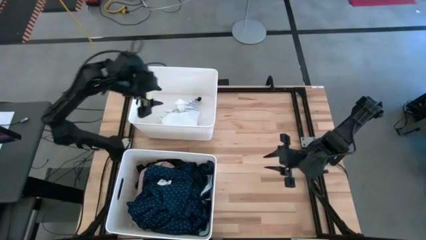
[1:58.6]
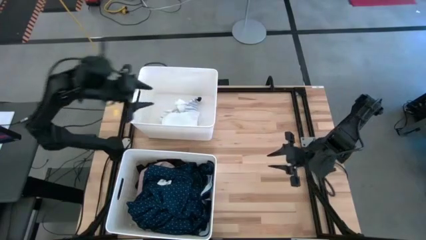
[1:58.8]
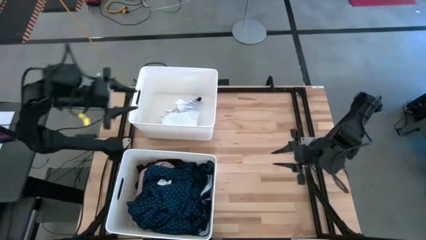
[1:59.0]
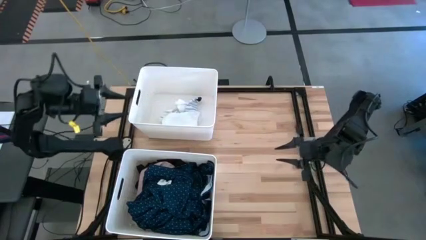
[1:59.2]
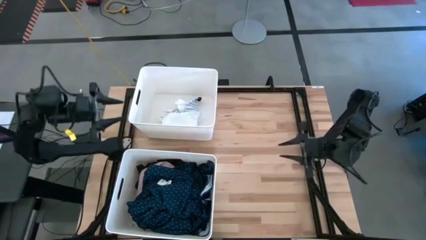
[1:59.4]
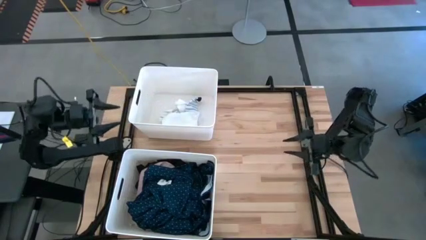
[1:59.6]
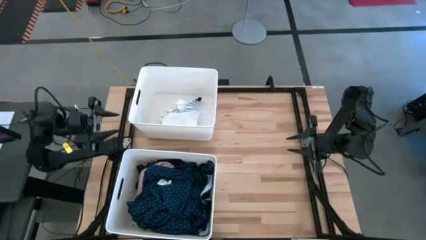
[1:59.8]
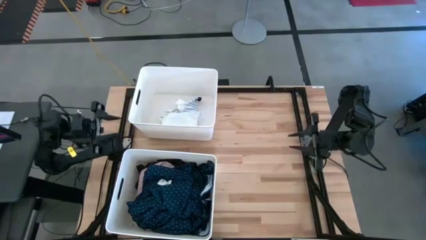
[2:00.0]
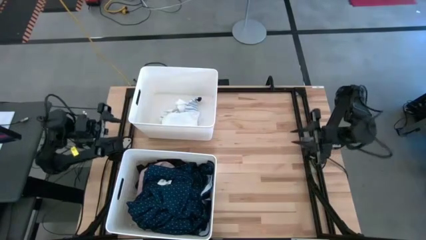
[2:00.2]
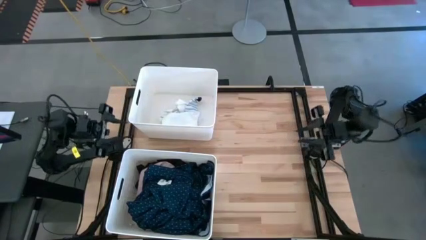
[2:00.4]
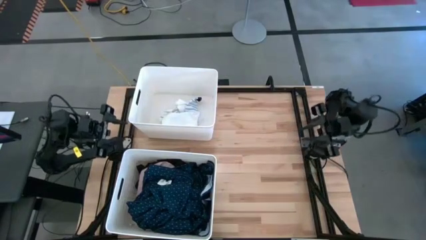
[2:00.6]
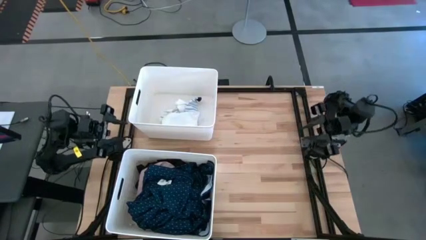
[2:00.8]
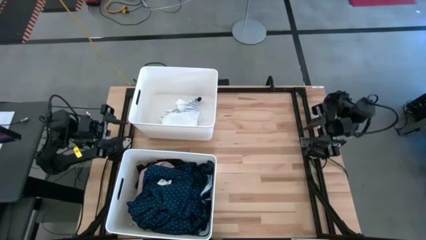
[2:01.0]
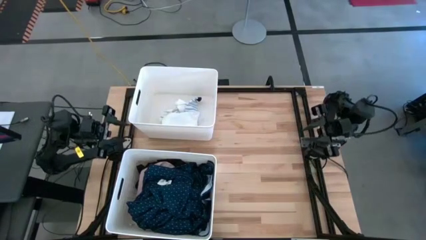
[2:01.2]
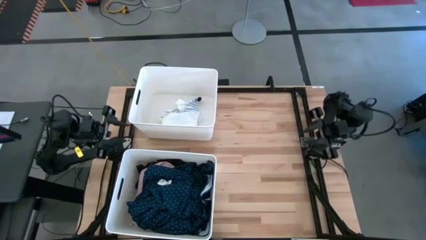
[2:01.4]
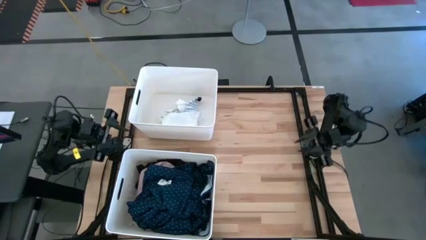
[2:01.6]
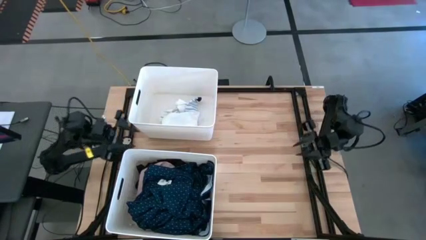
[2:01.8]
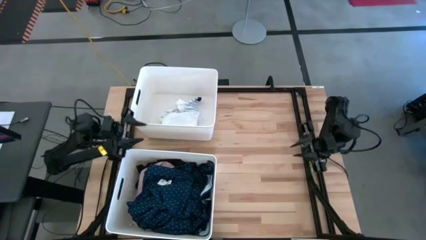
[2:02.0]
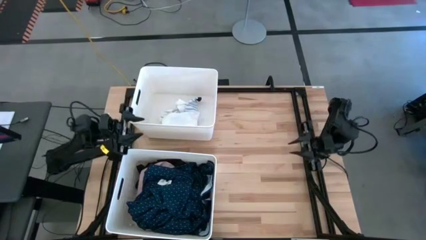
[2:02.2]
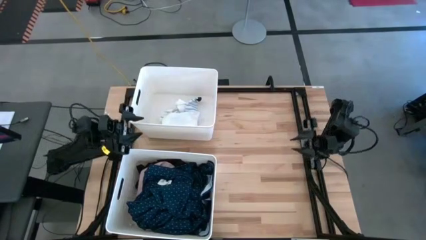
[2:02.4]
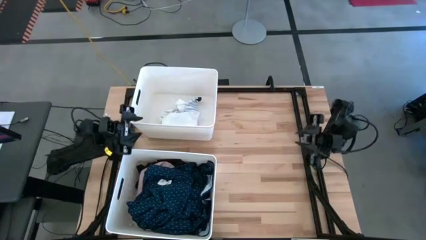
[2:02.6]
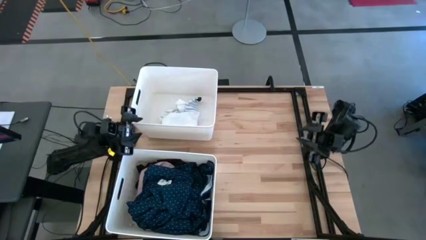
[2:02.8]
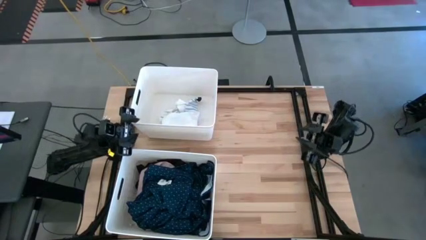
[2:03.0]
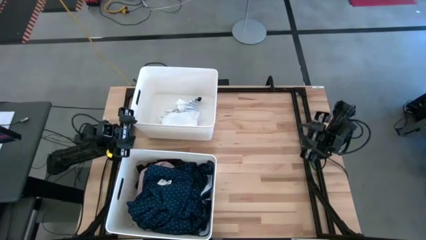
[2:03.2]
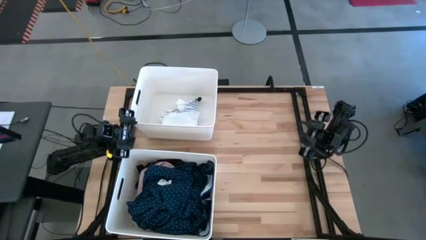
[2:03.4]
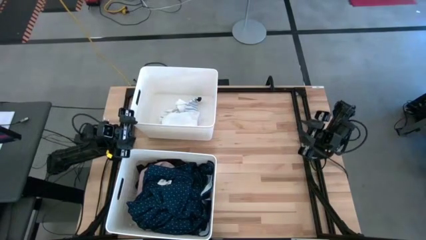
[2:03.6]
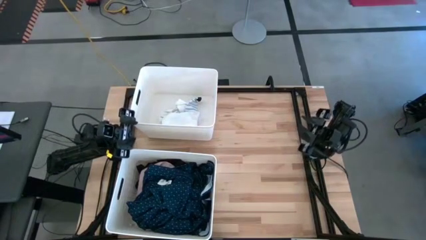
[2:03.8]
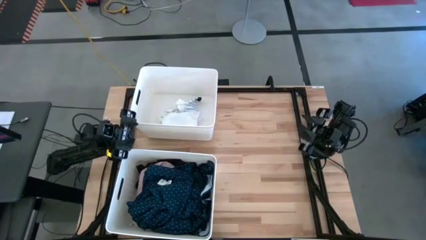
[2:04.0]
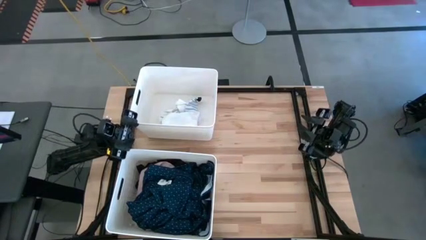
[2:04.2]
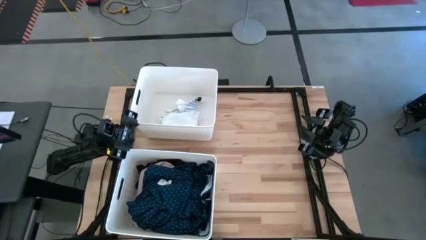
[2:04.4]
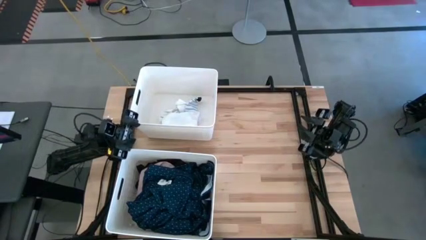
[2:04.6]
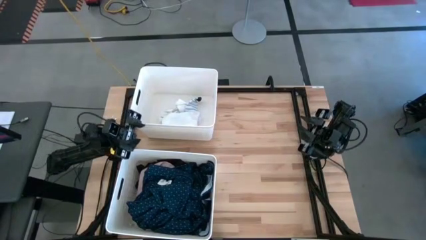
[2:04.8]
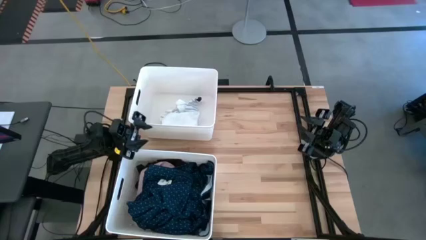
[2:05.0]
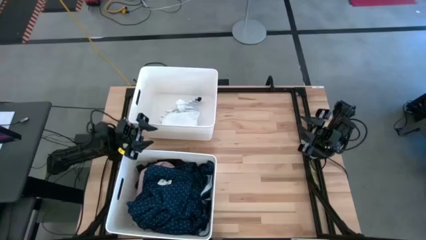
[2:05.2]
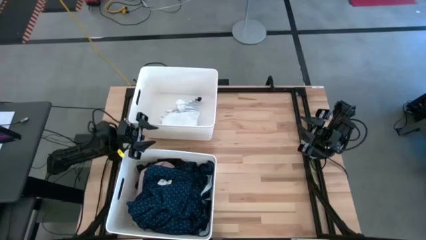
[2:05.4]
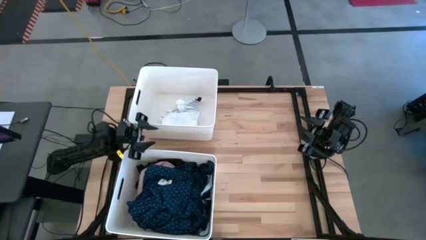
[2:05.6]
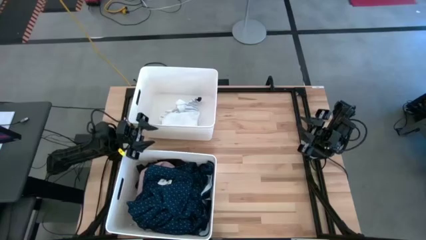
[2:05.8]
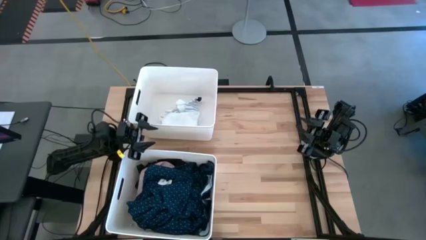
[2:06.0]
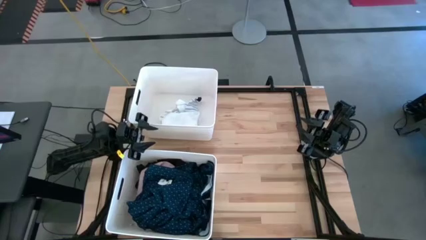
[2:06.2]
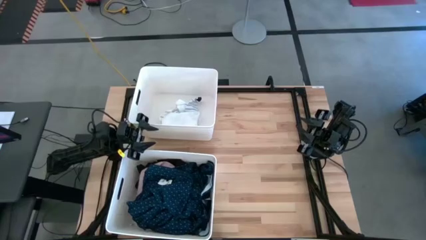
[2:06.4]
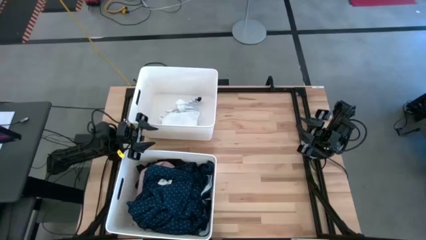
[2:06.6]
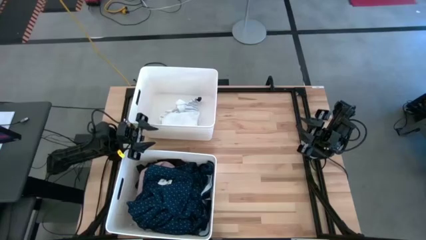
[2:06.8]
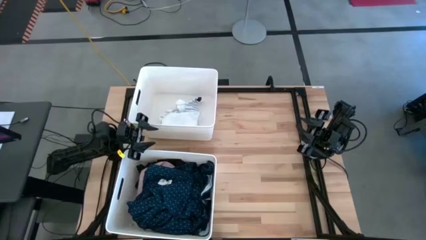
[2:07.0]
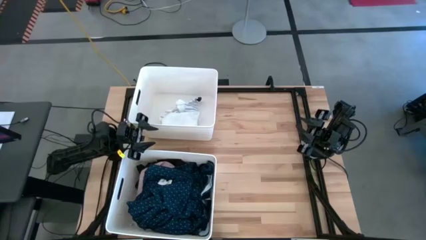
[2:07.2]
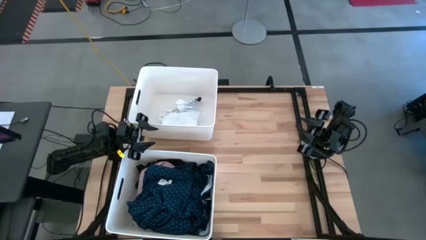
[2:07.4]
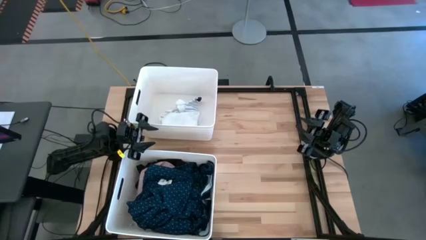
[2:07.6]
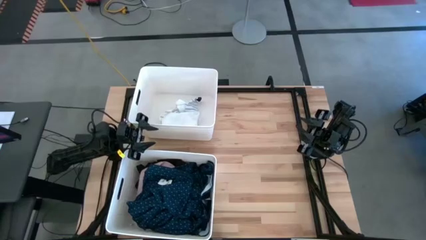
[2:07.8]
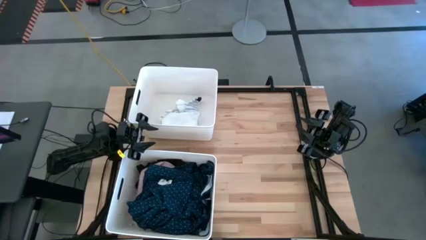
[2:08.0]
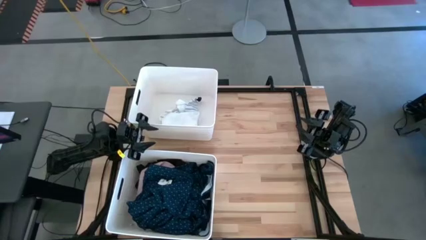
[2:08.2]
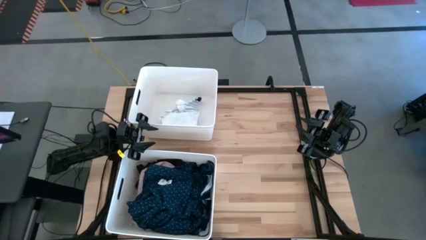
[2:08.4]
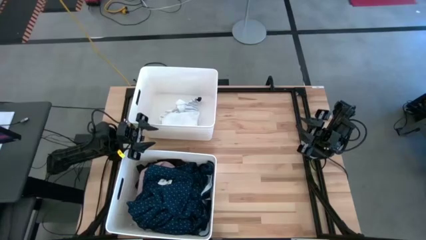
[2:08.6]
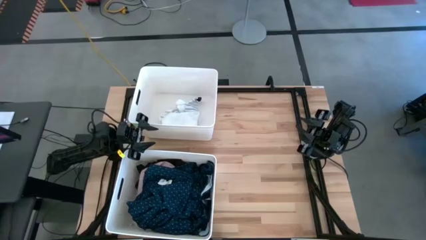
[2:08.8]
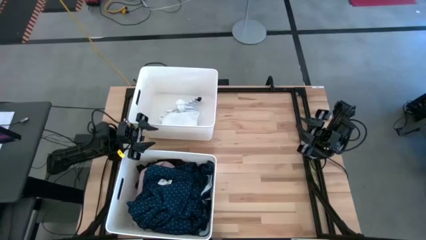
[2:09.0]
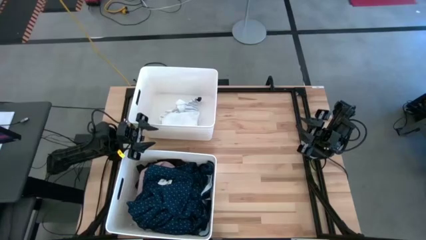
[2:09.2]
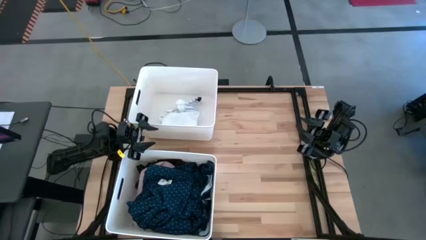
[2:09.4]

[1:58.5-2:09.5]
Task: Sort clothes
Return to Home Position

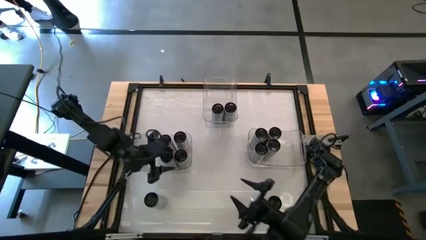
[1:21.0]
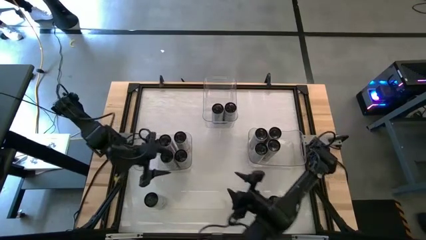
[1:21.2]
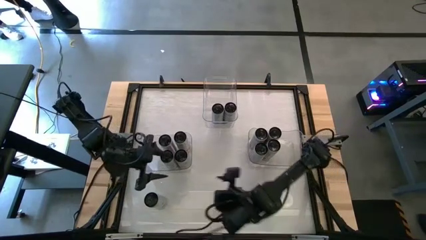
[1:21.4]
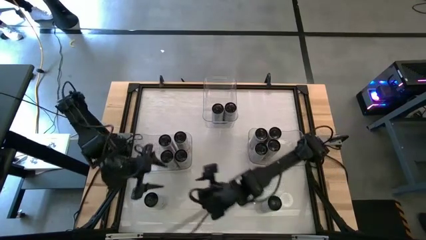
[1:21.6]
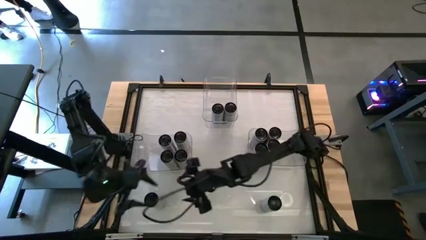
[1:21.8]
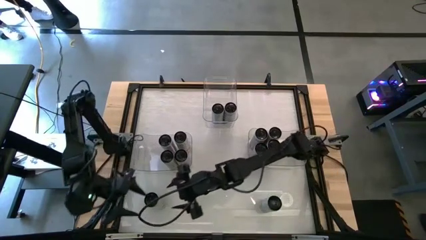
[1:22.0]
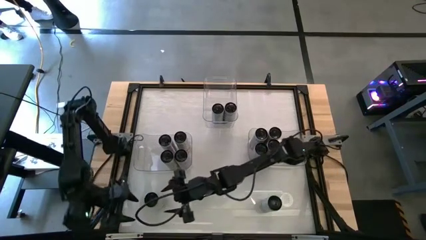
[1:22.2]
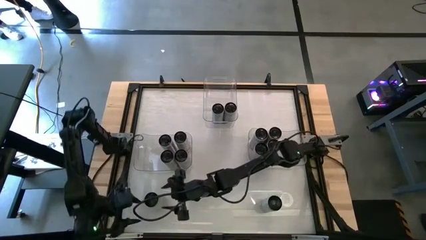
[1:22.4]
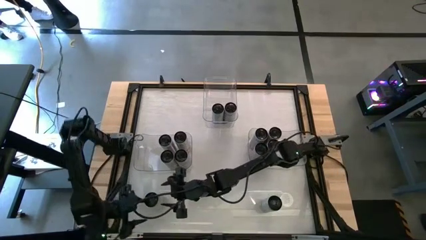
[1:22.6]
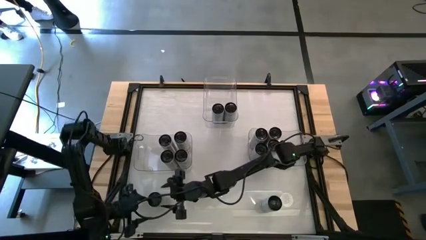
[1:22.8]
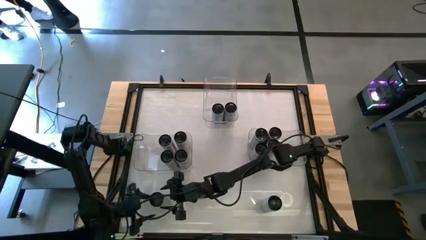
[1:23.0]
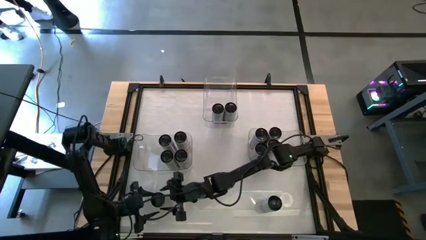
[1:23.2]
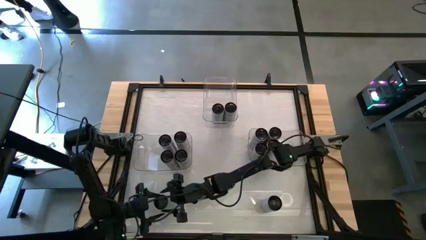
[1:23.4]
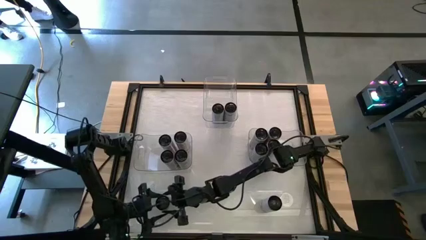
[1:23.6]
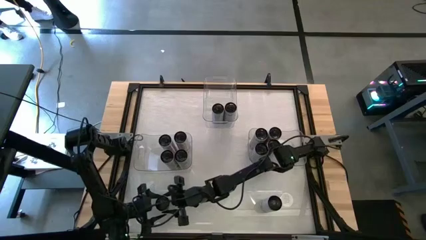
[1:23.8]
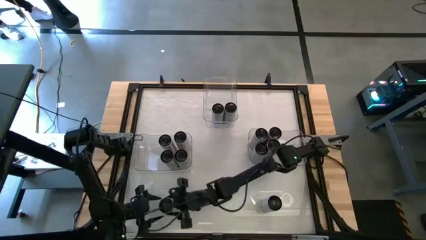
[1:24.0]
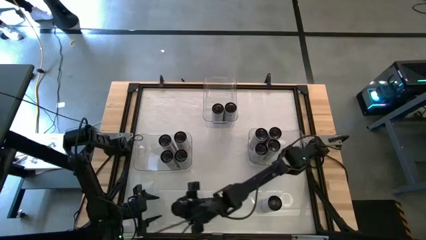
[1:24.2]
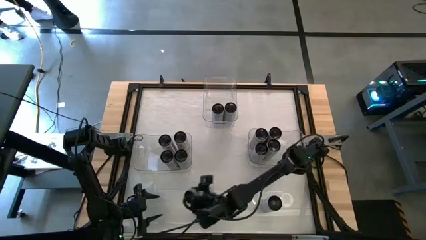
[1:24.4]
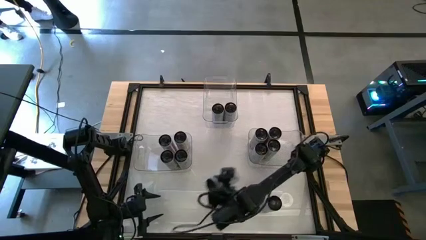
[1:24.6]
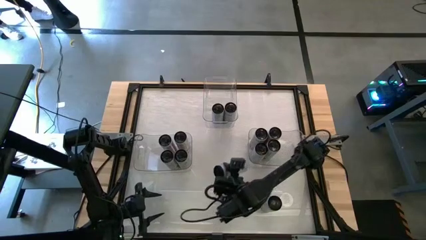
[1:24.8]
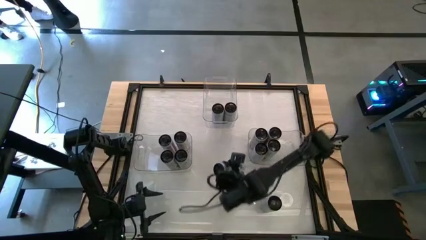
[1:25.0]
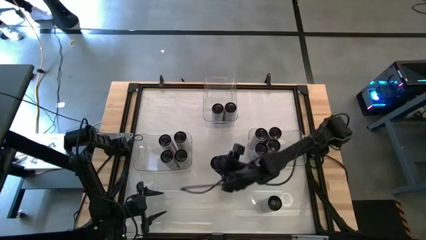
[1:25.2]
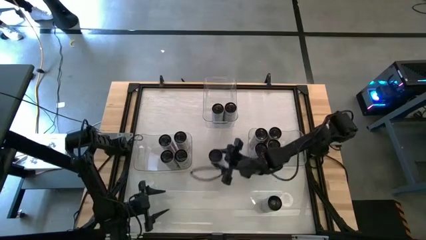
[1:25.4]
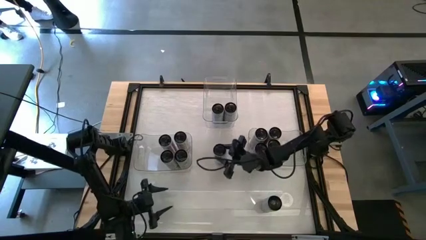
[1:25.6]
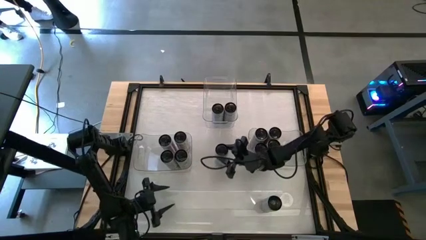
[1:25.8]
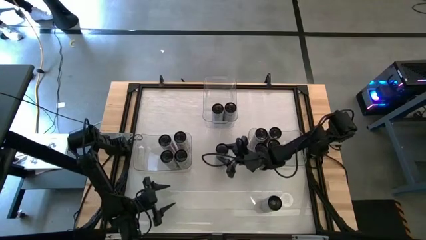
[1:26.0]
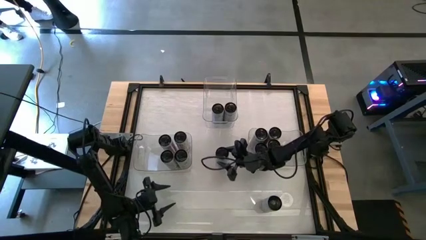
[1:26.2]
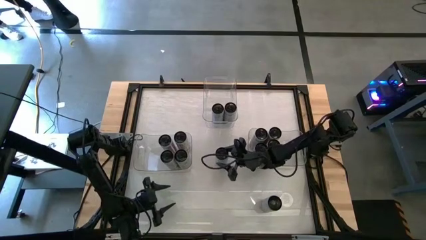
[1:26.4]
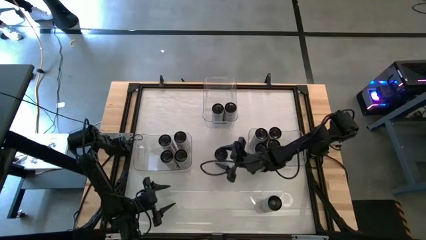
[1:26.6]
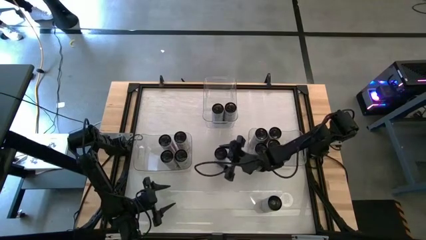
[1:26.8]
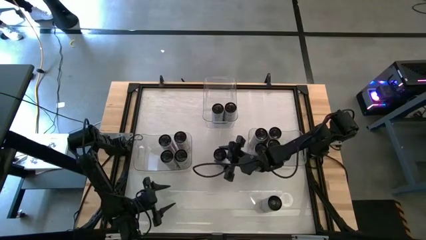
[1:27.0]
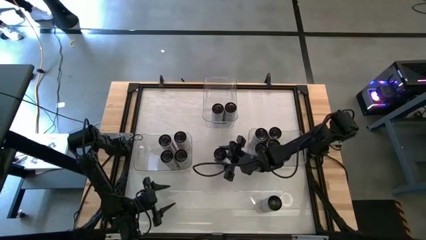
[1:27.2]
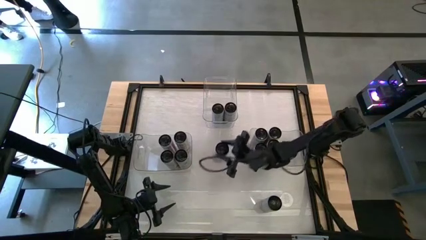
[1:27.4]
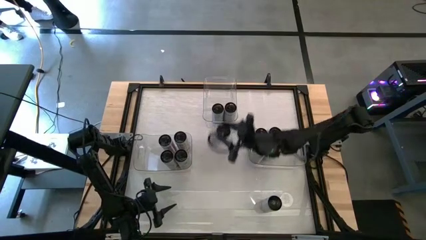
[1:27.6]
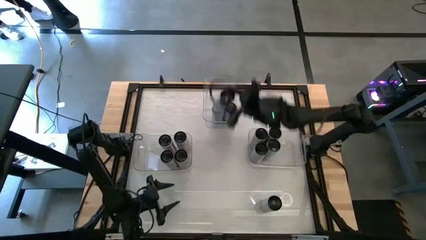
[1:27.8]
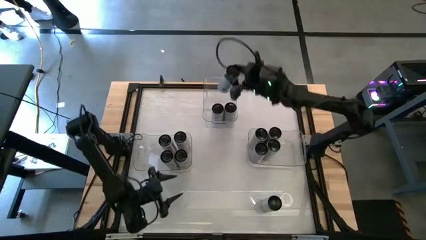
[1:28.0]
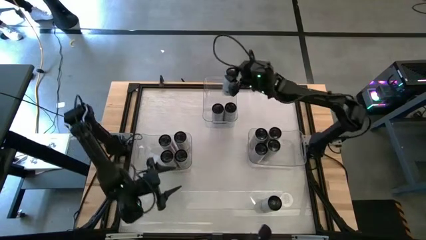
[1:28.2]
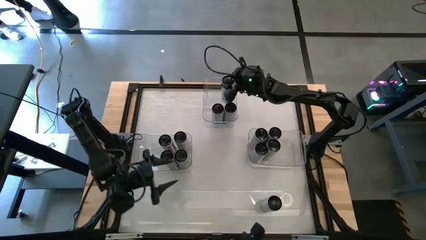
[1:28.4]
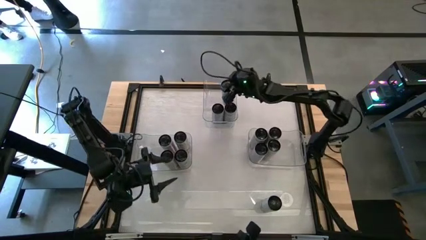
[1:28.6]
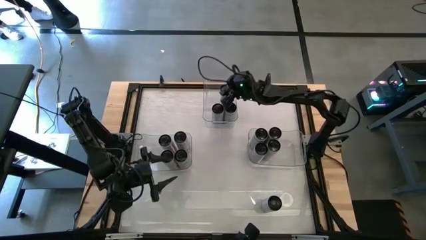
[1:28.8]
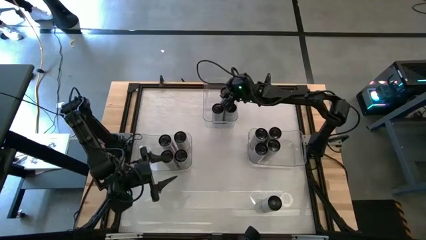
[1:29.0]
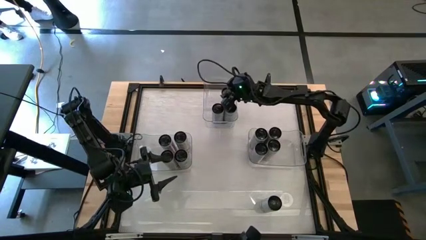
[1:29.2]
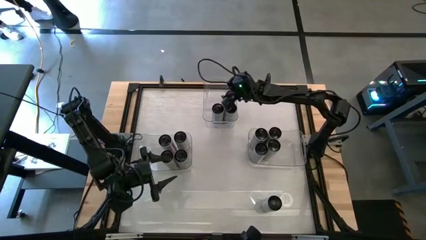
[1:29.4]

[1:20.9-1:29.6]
Task: Sort soda cans
Put the left white-blue soda can into the top middle transparent bin
